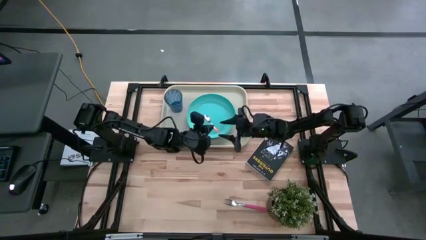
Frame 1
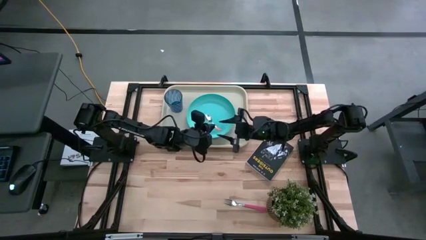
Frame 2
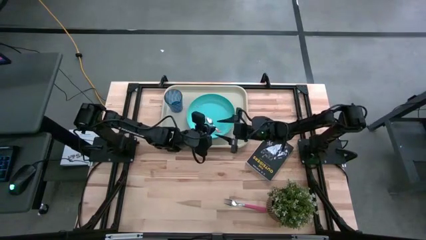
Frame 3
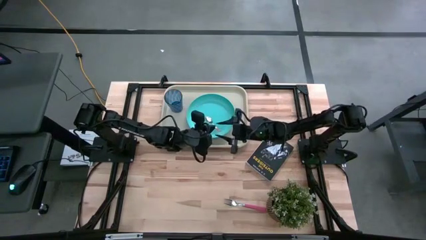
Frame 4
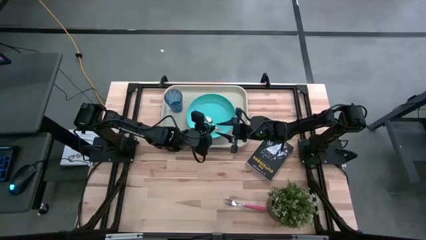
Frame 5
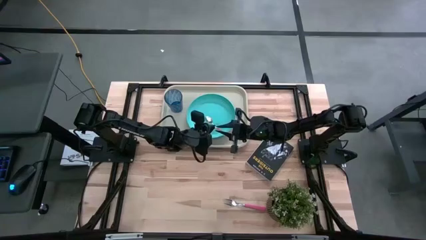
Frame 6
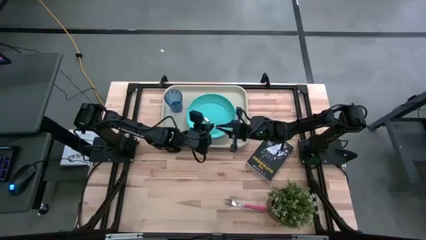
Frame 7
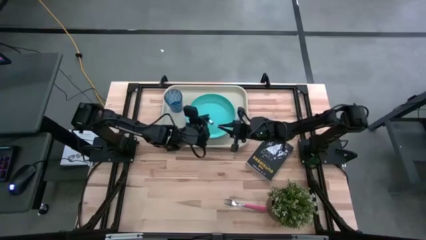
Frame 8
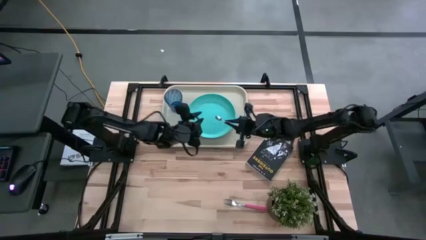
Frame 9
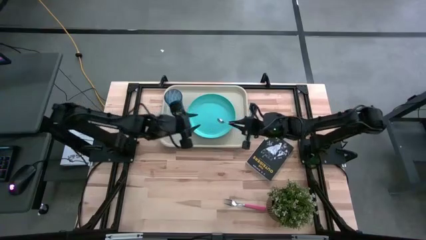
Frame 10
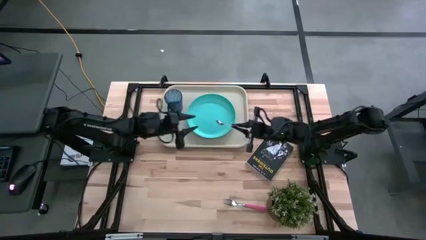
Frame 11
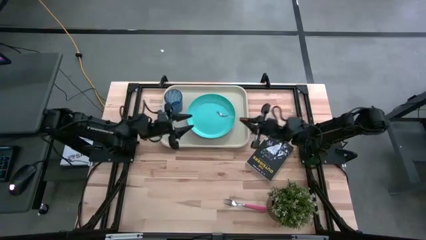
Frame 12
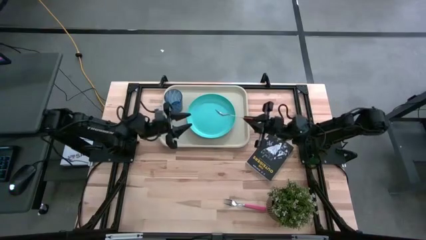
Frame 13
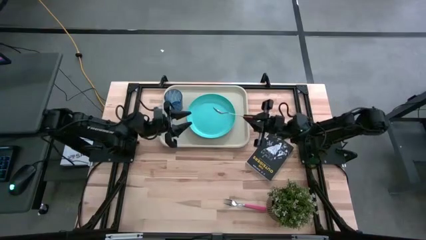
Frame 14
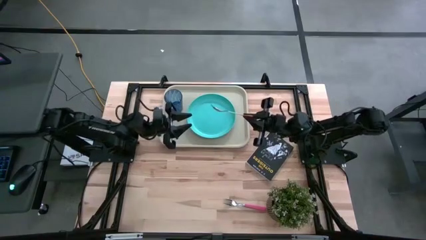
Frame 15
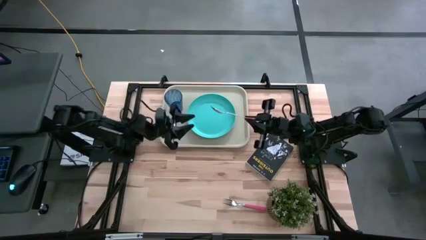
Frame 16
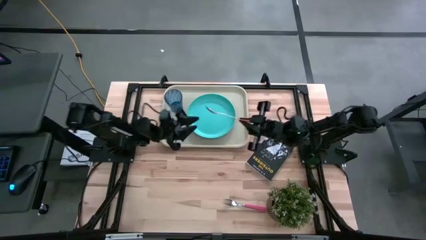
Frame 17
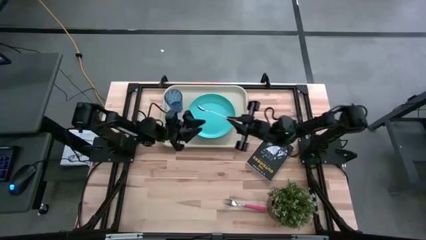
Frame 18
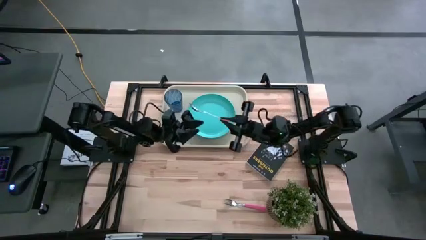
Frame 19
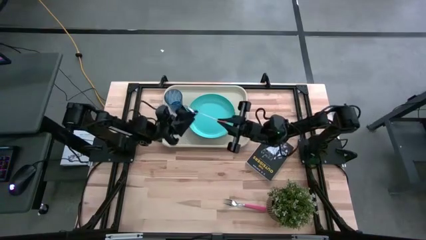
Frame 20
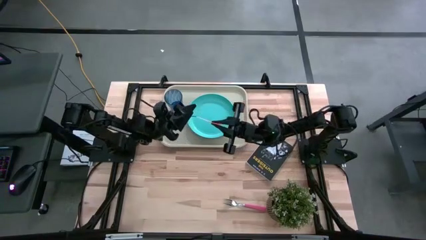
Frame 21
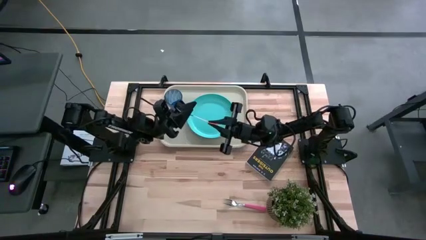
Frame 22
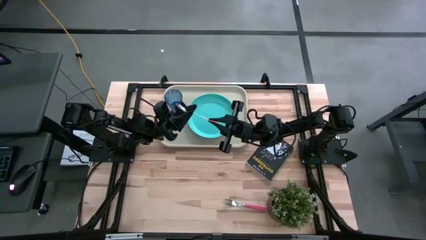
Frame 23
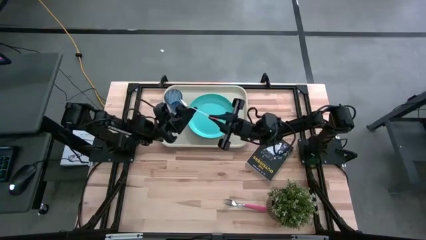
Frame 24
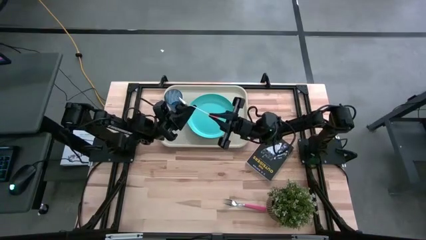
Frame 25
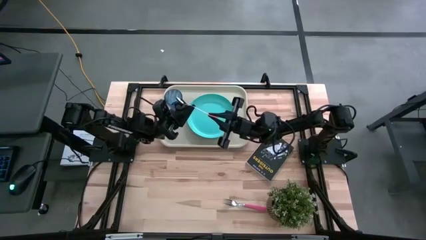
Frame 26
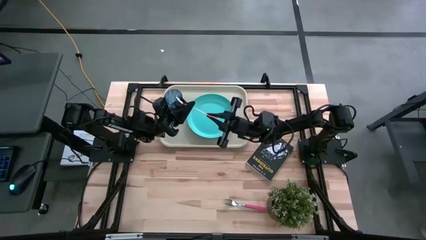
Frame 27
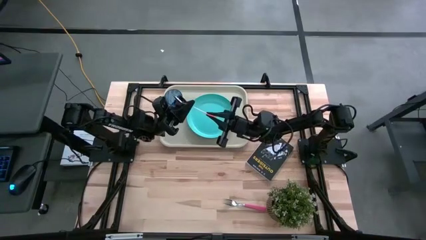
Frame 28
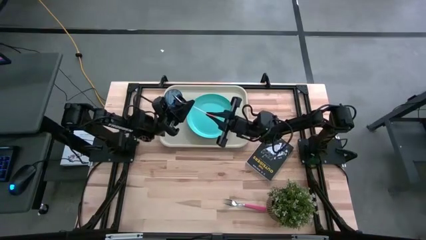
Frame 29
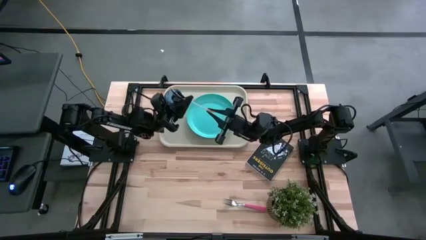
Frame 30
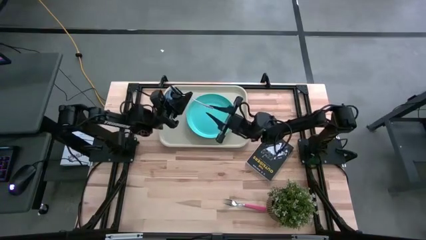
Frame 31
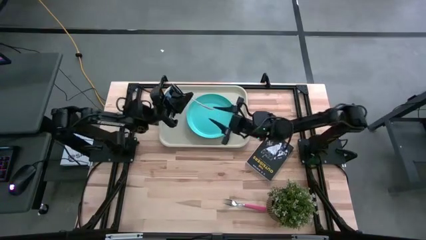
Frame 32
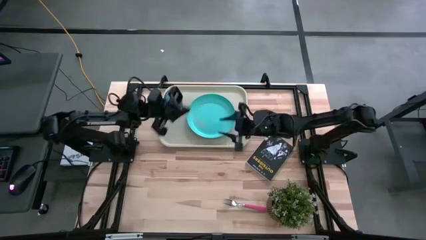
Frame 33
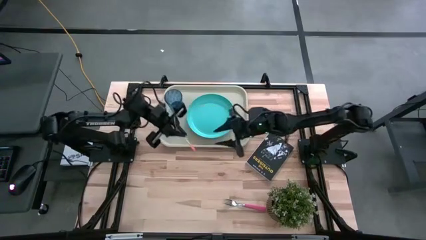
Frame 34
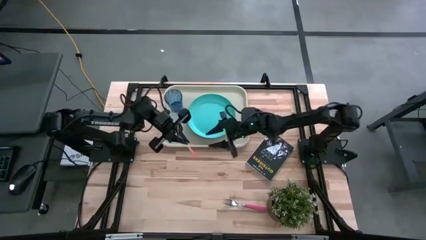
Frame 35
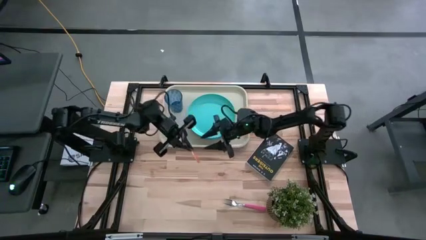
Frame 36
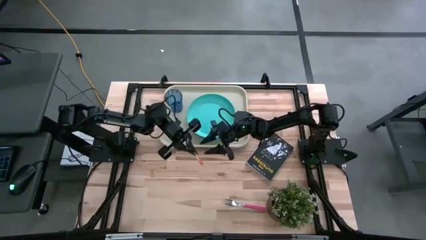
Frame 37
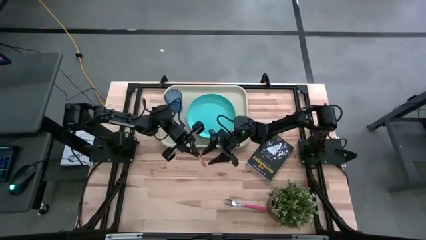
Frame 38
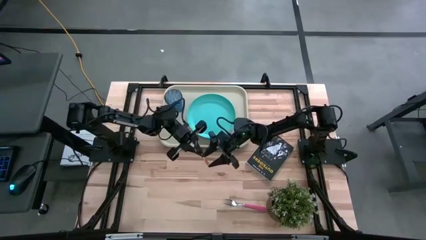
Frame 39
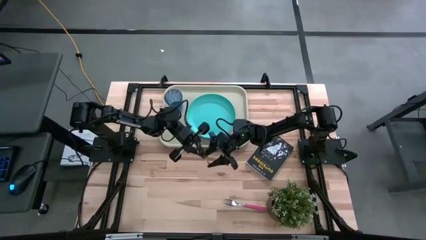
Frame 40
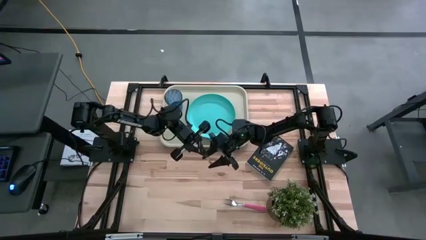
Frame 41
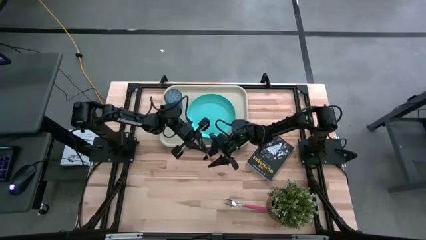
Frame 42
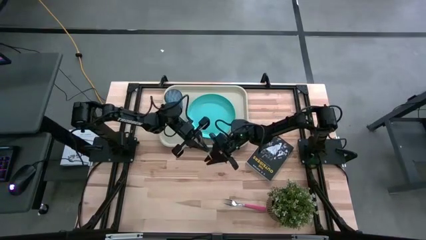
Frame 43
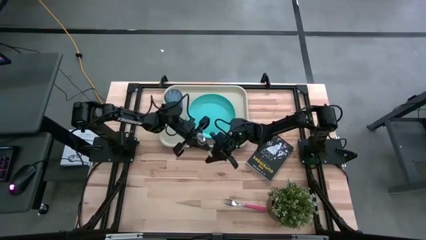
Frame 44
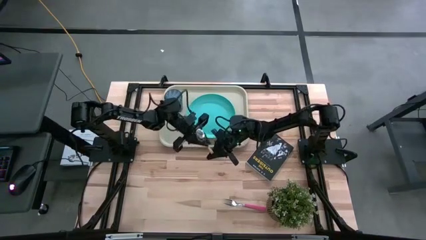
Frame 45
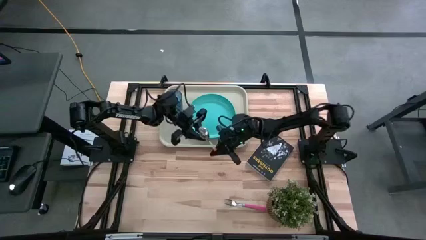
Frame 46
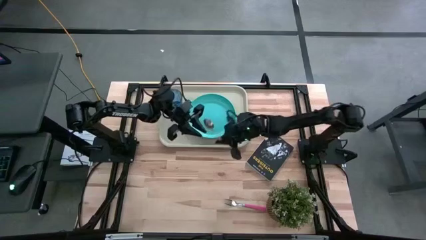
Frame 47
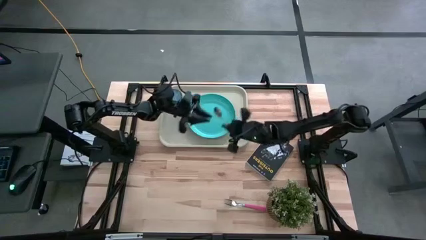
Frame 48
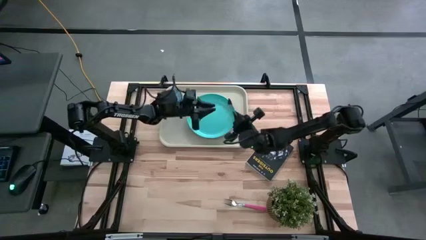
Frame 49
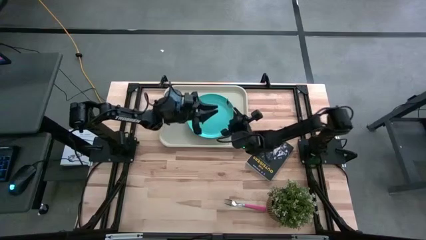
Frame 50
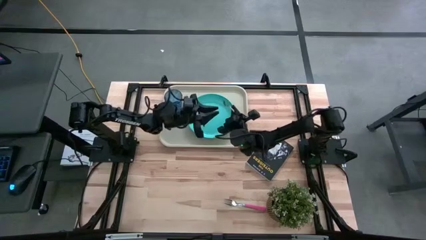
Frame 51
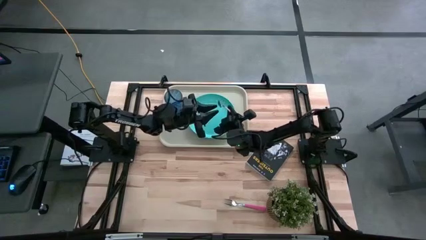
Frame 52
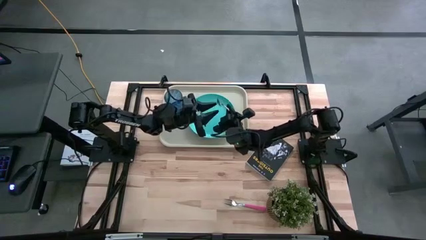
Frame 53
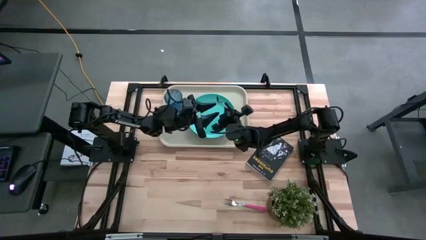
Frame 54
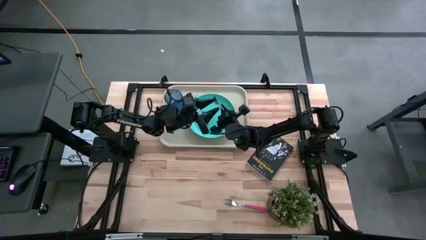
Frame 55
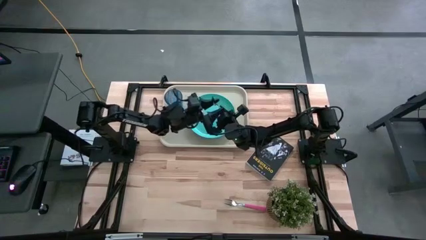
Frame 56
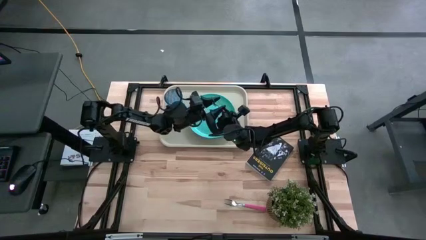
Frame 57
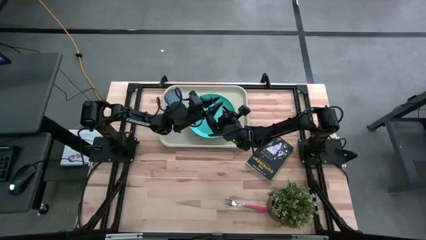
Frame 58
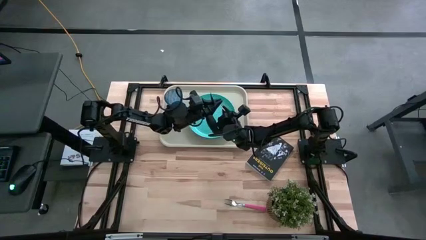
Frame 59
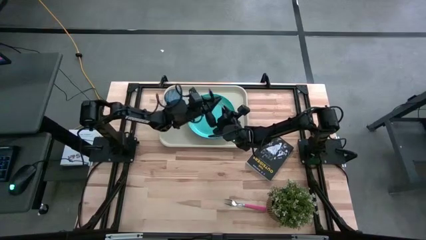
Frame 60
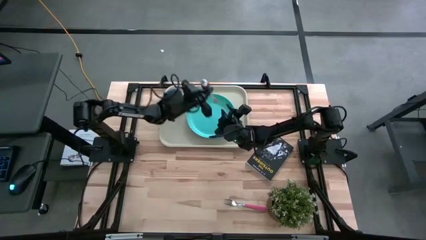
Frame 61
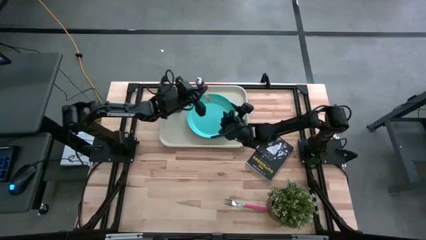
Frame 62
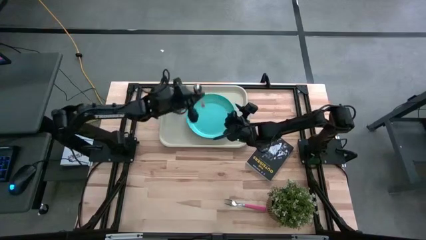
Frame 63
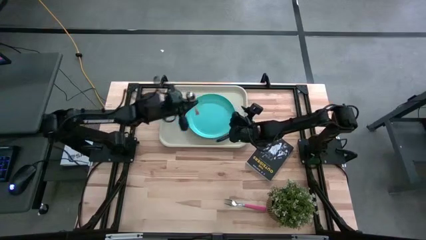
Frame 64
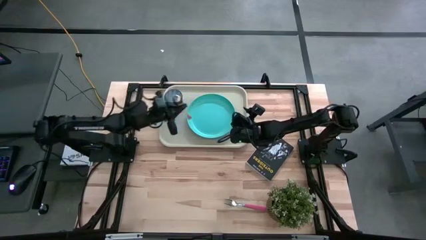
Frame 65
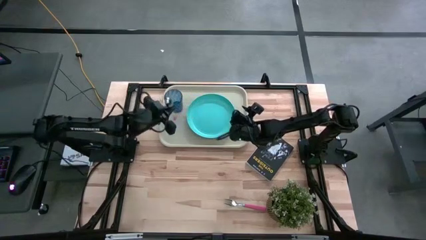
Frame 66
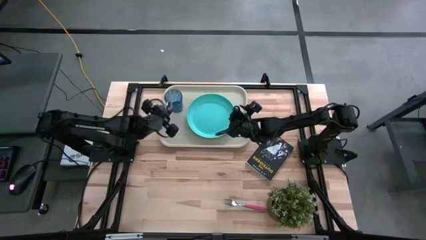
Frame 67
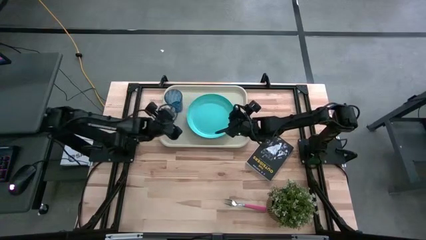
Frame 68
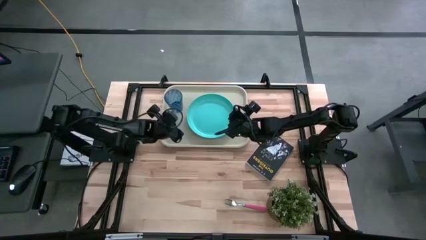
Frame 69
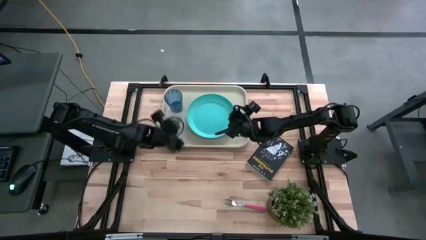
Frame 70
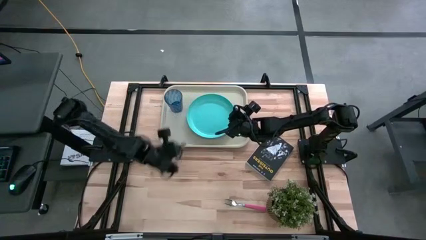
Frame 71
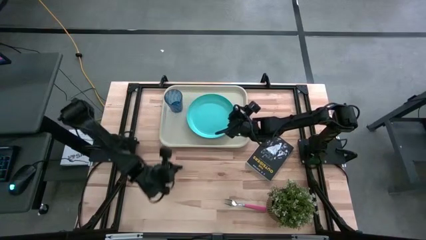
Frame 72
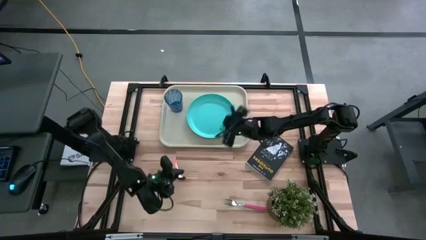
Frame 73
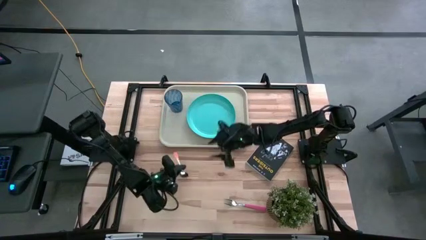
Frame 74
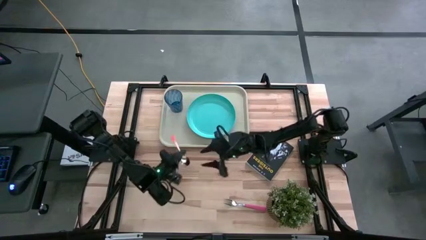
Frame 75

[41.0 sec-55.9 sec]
Task: Pick and place plate/cup/fork/spoon on tray
Put the orange spoon on the white tray beside the light blue plate
